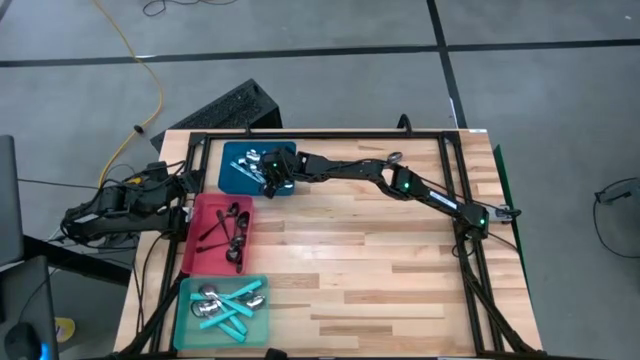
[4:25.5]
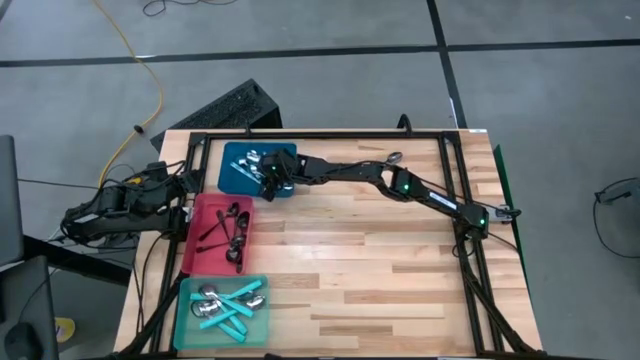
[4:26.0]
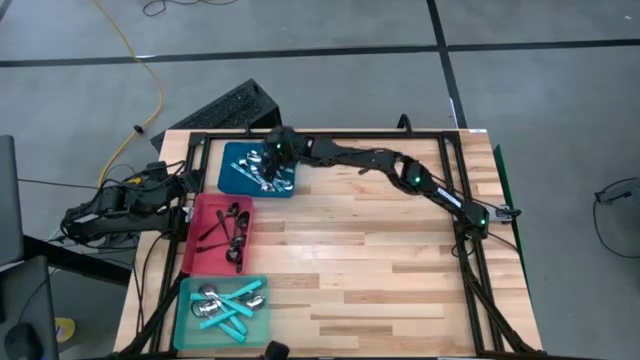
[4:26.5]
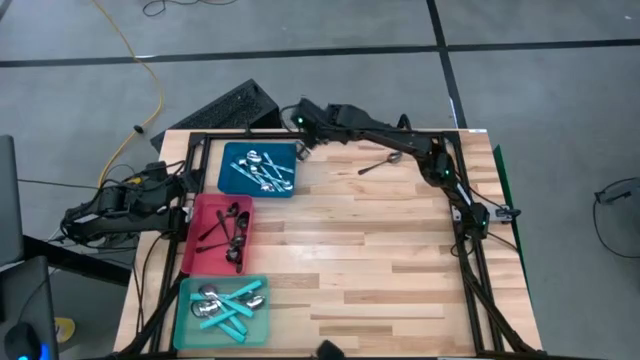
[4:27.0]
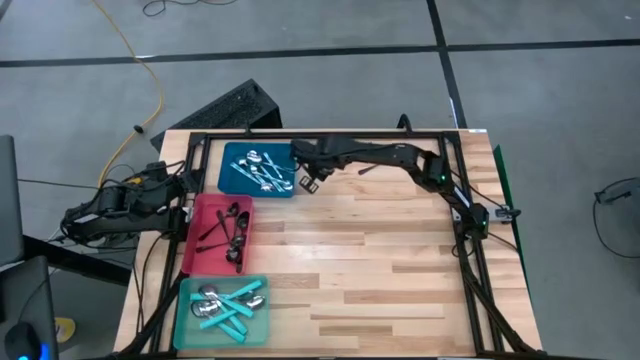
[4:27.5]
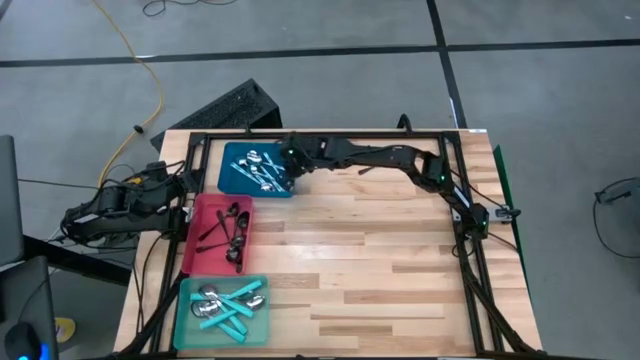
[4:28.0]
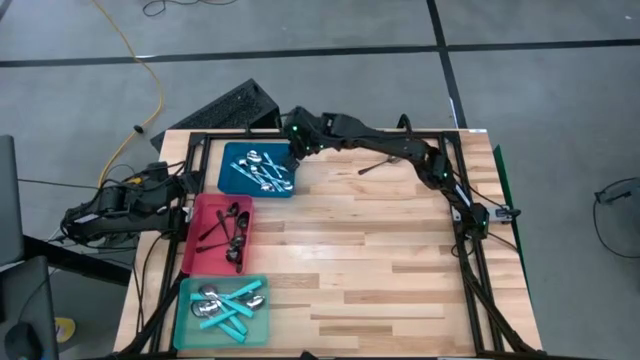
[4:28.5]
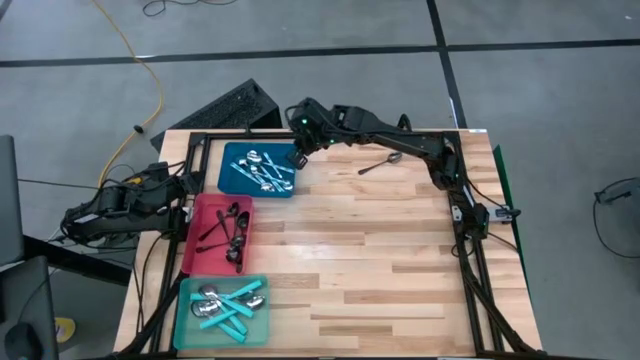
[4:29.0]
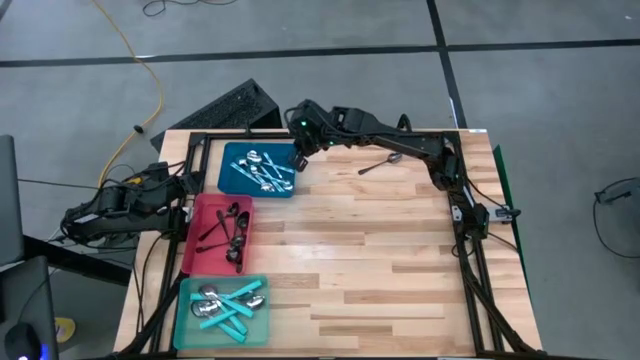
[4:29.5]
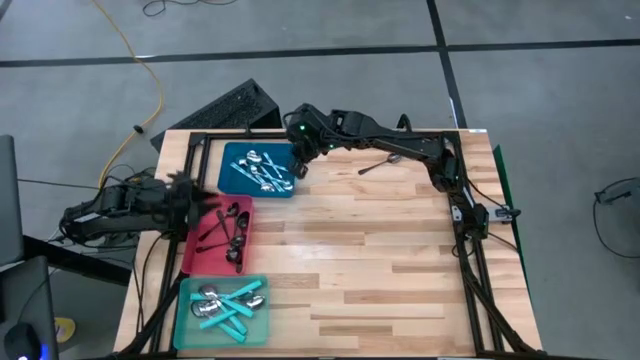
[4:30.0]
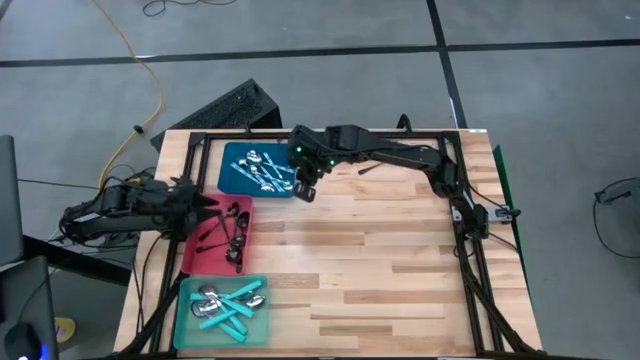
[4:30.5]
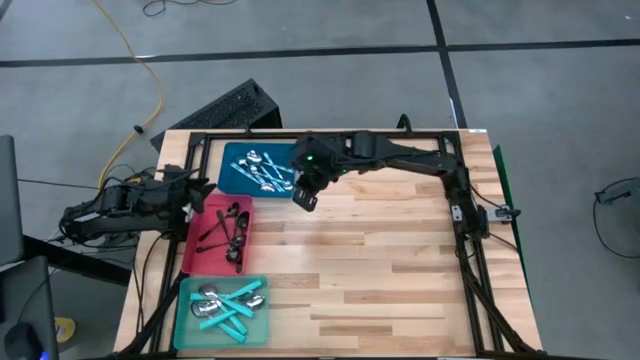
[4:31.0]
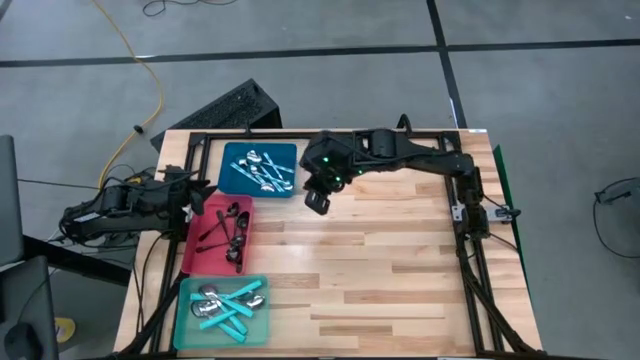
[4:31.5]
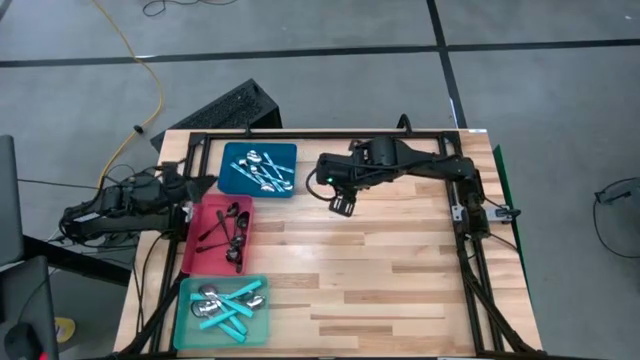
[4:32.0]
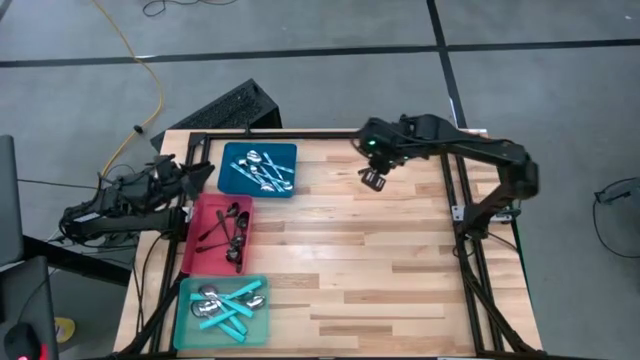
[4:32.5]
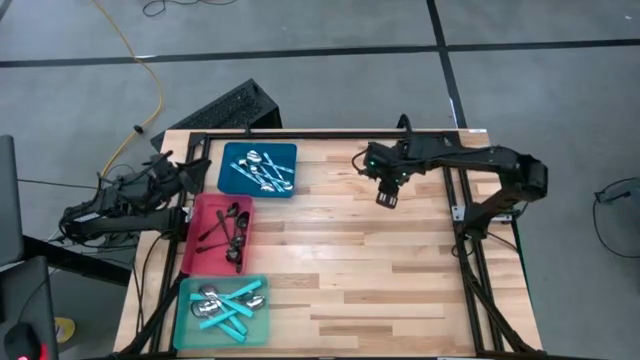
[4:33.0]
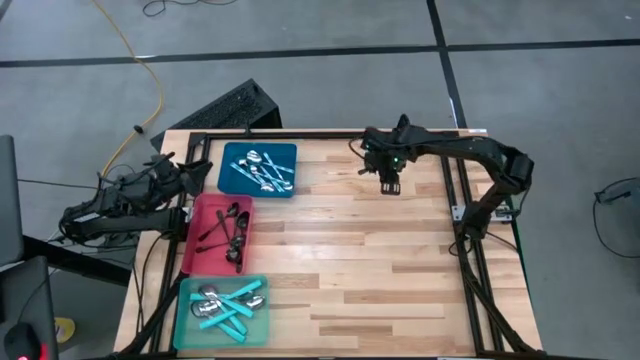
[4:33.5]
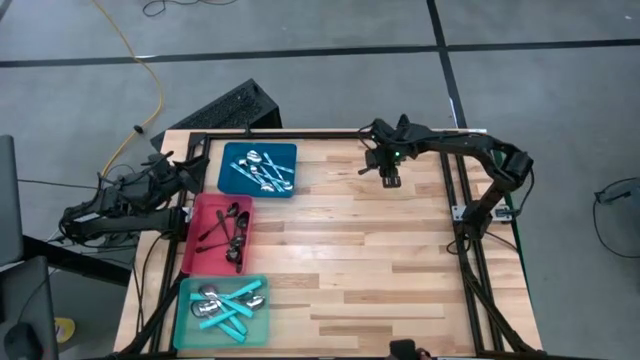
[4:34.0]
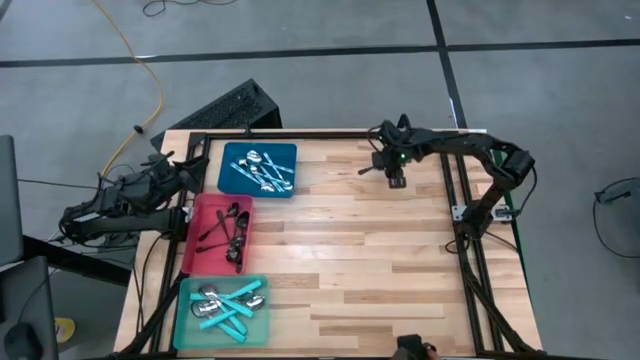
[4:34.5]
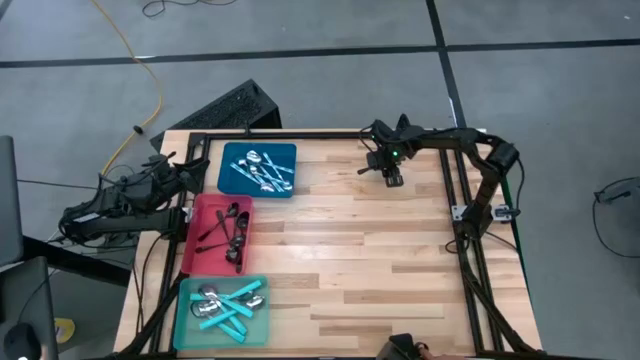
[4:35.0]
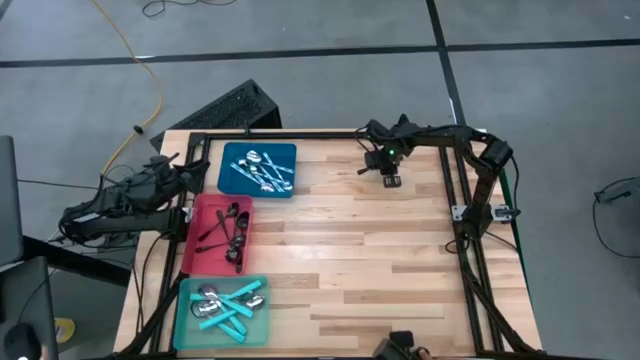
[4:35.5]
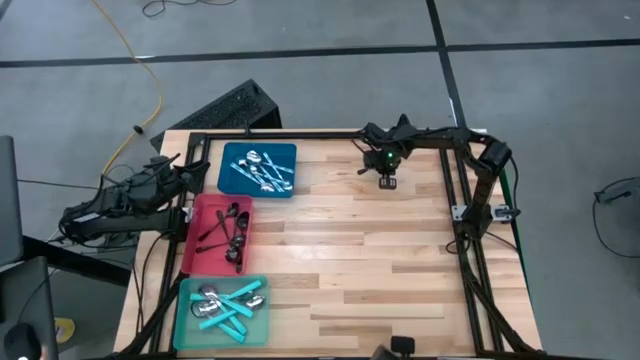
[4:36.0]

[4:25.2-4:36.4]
Task: Sort silverware by color (type)
Put the black spoon into the red bin

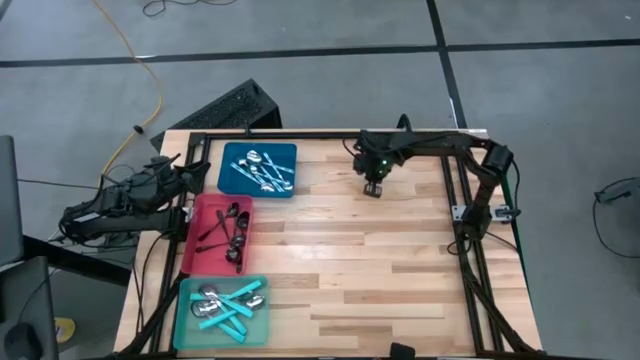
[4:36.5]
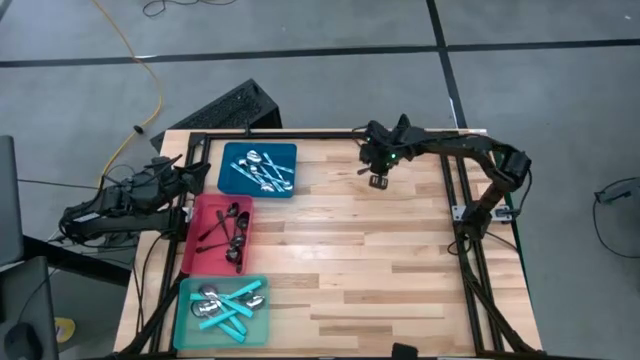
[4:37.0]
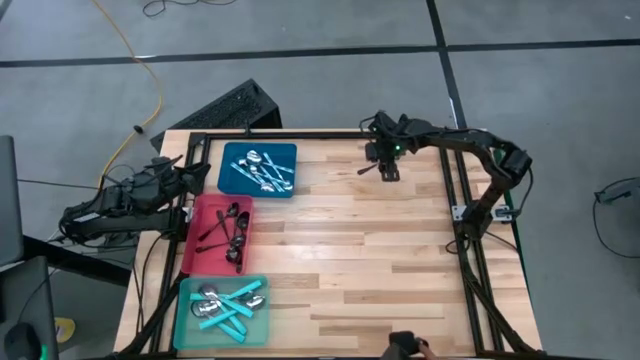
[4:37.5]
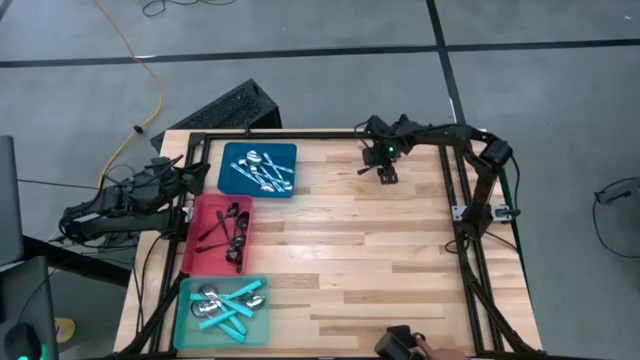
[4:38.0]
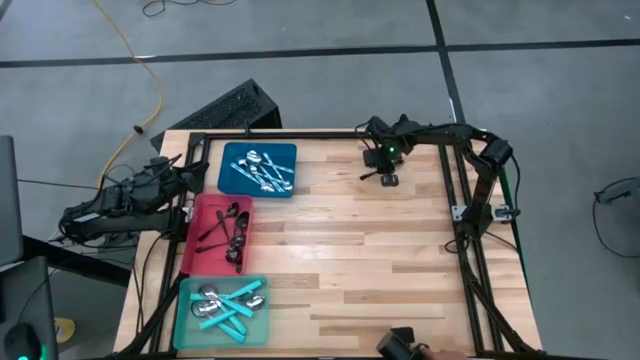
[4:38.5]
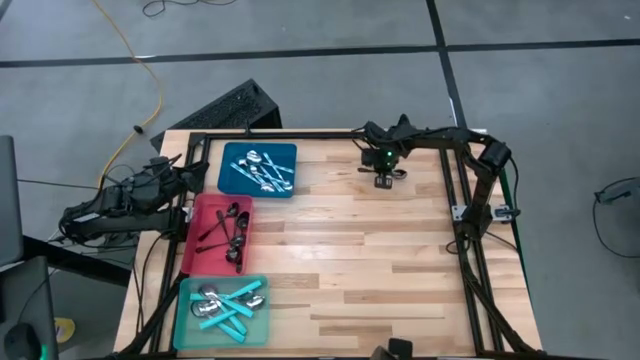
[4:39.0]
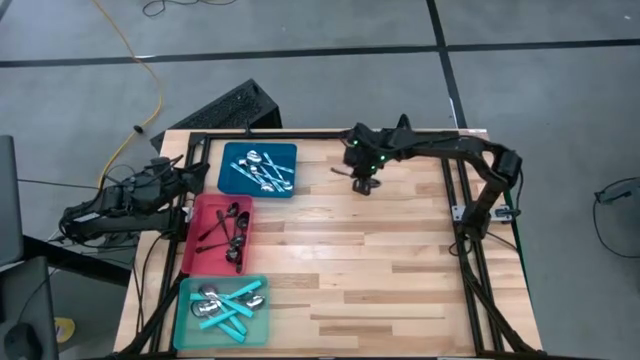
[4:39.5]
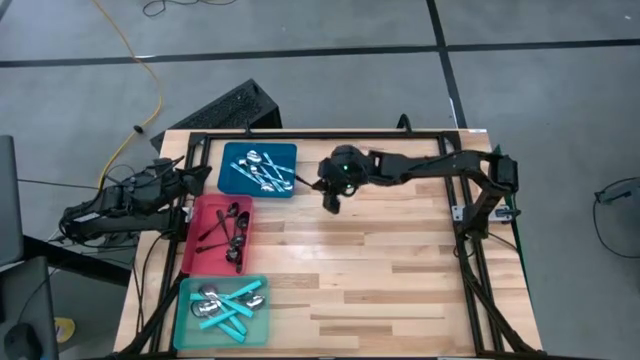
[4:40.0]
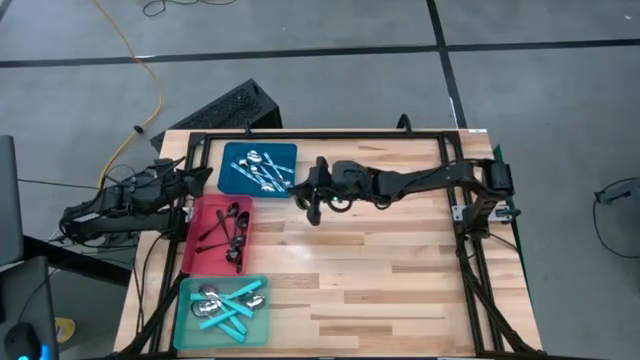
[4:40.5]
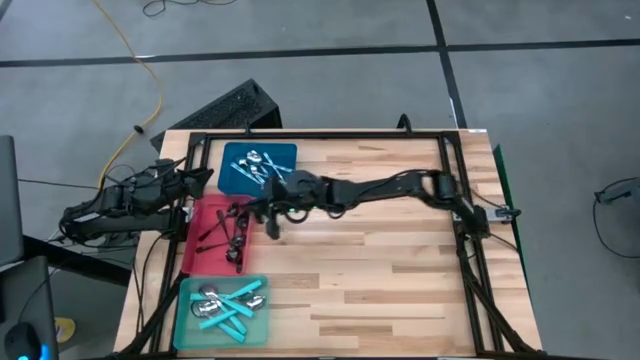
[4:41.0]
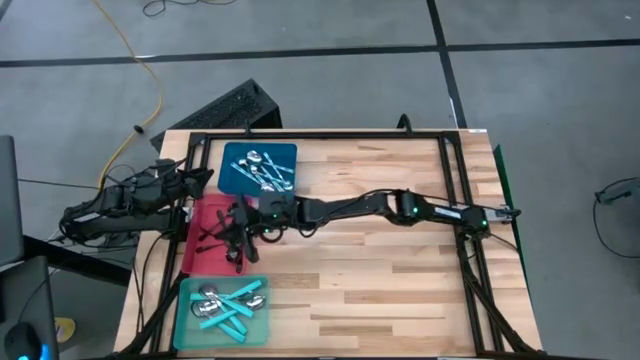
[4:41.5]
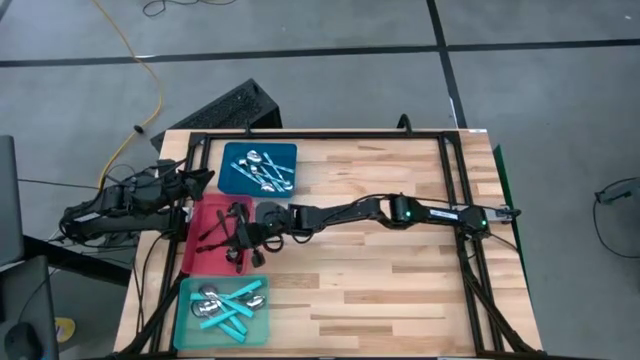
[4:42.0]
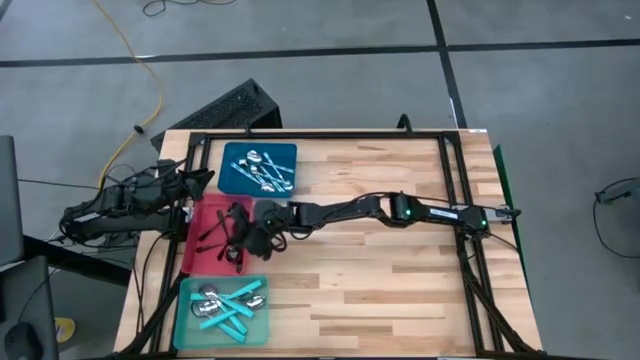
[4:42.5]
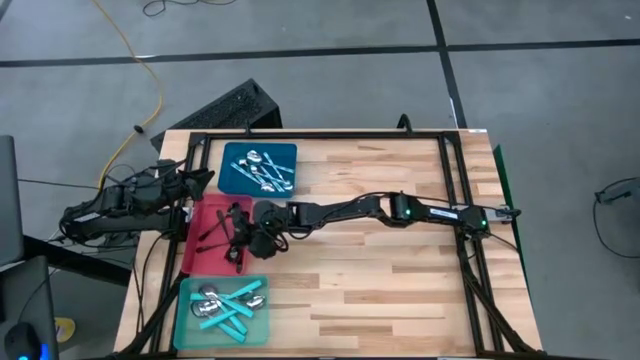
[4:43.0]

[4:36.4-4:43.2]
Put the black spoon into the red bin
